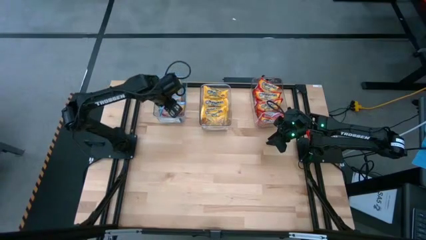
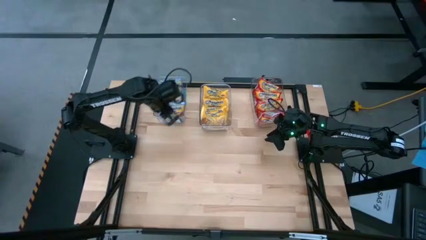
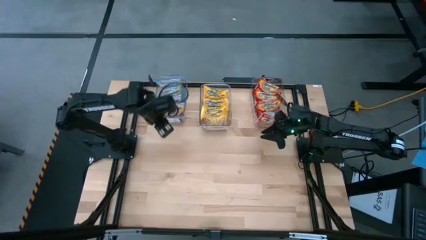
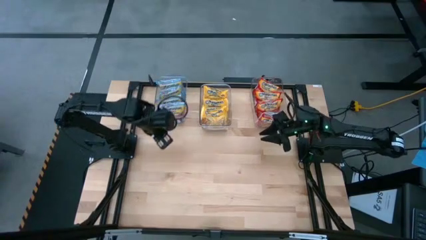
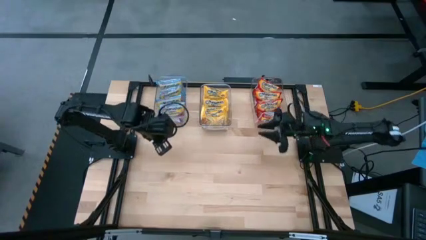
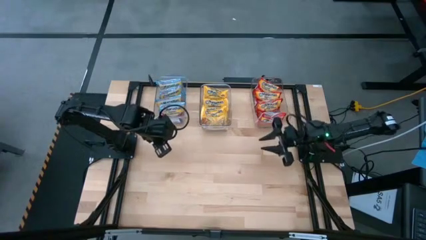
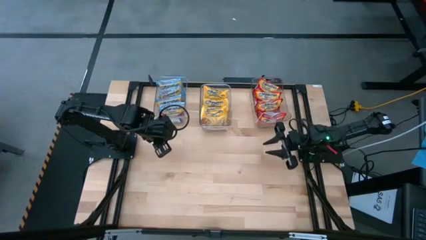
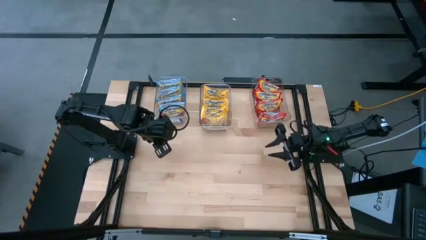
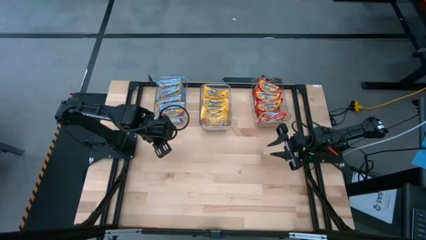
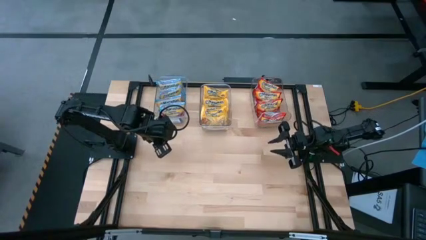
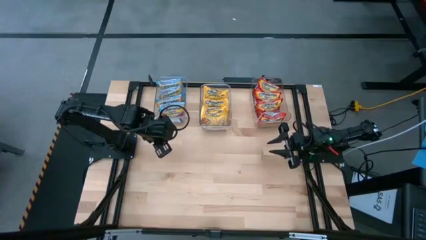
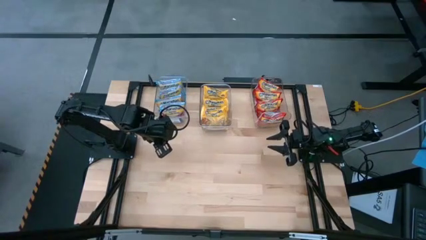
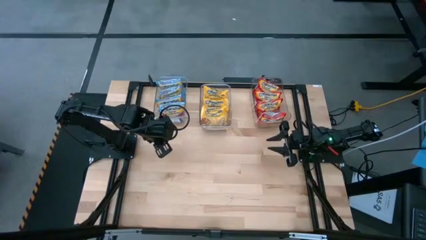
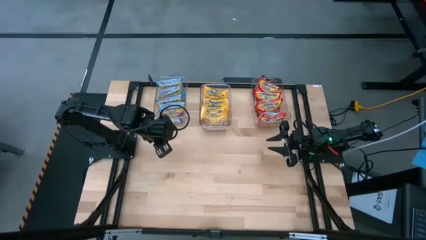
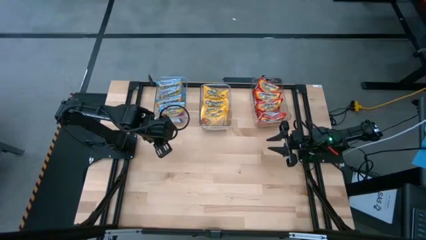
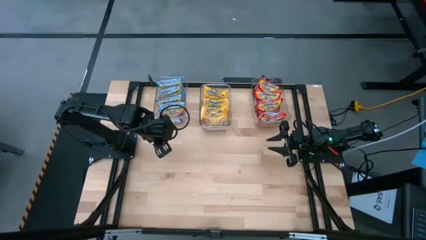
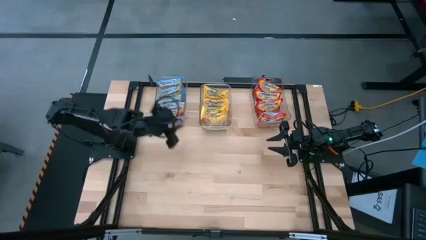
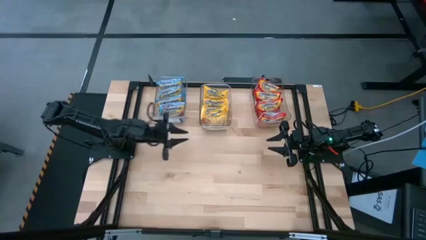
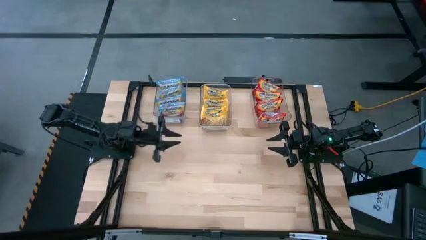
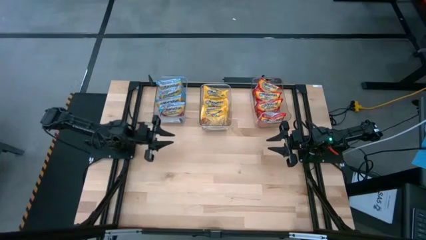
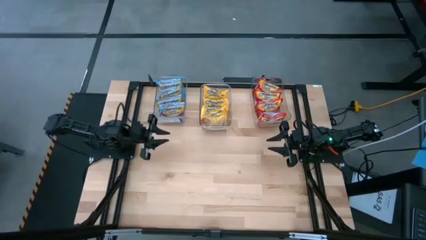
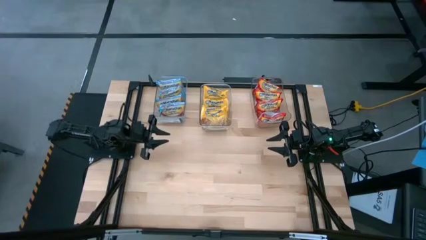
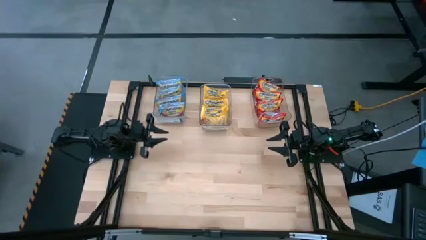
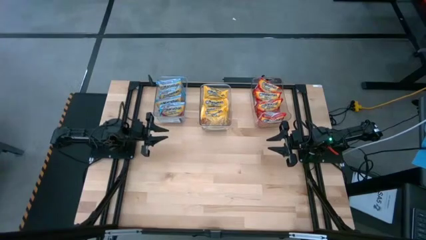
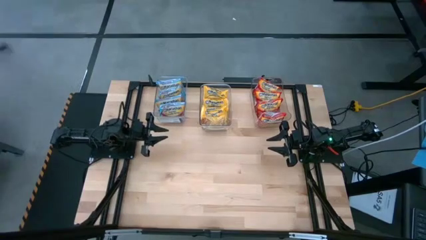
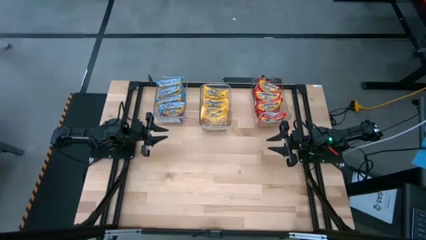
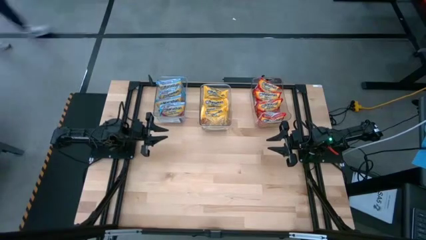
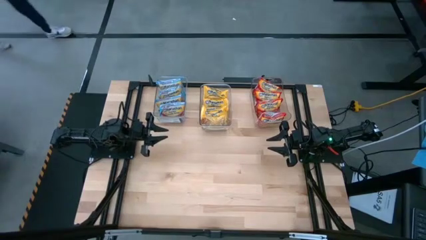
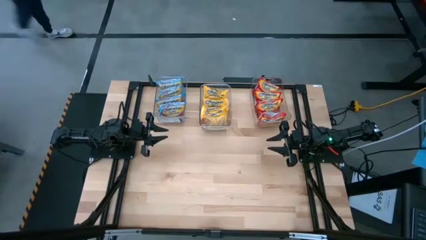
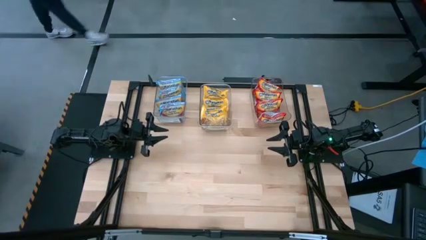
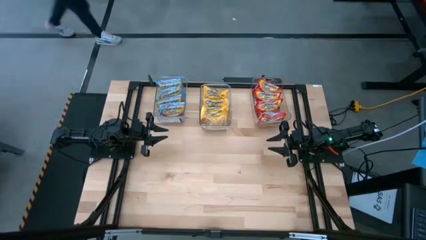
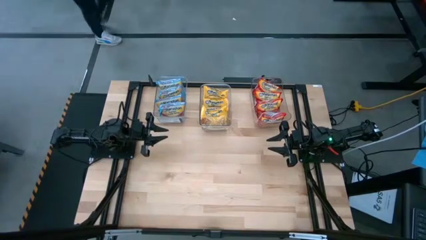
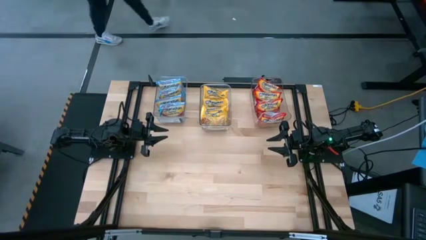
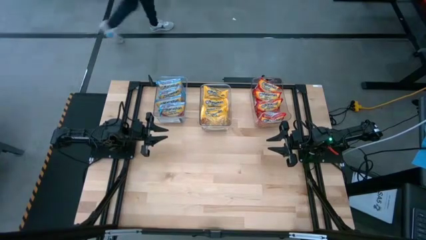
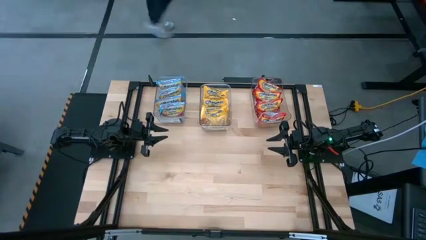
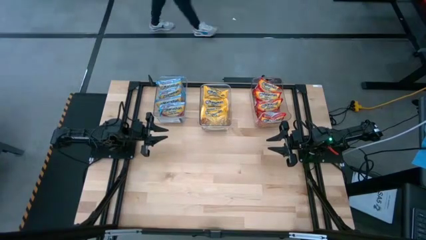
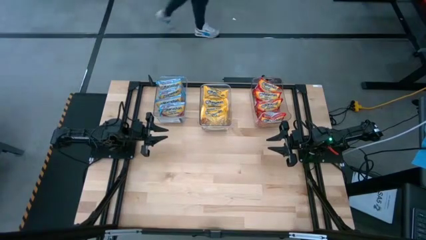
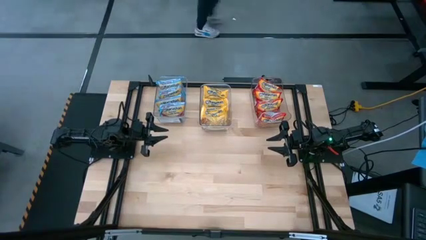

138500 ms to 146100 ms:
Task: Sort Maruchan noodles
Return to Home Position

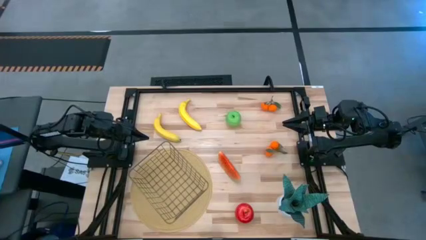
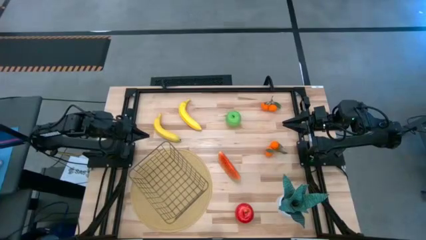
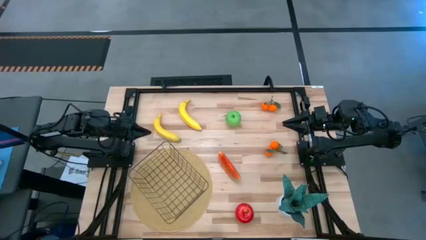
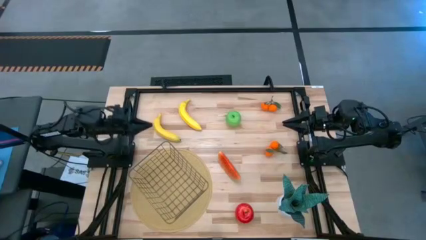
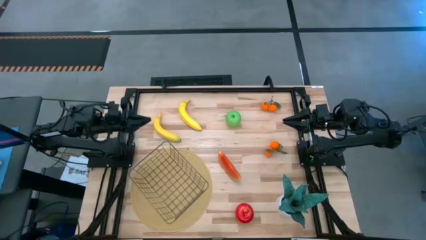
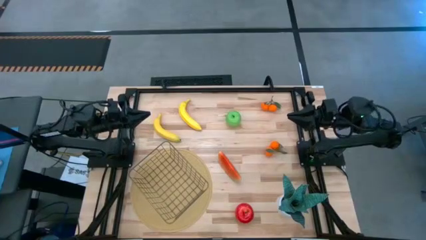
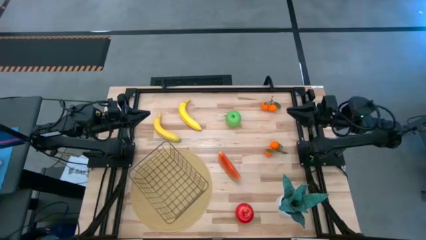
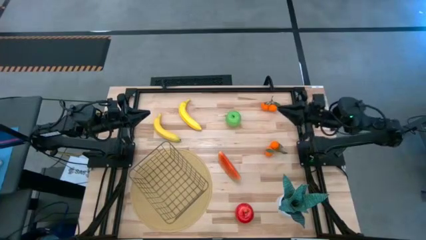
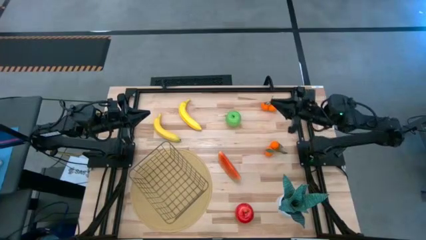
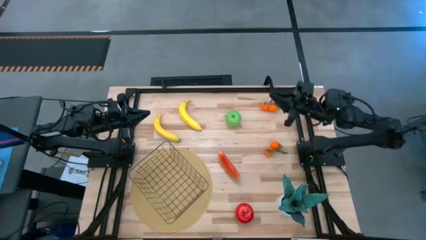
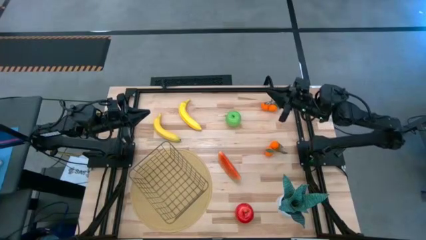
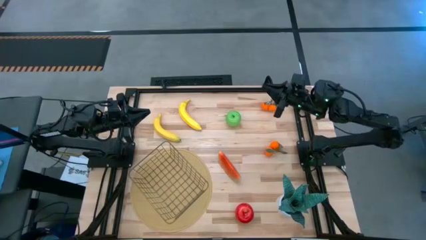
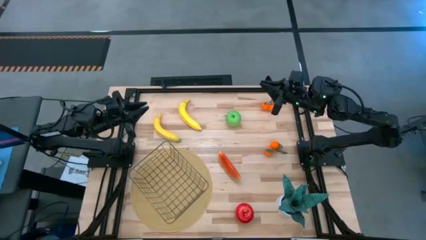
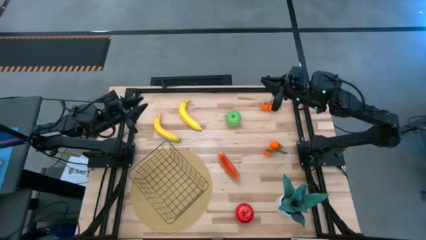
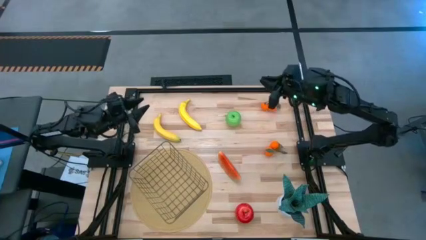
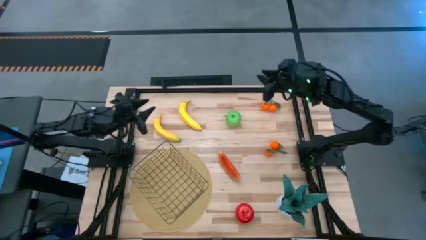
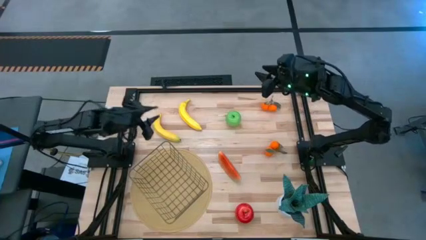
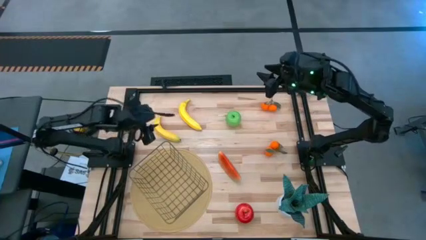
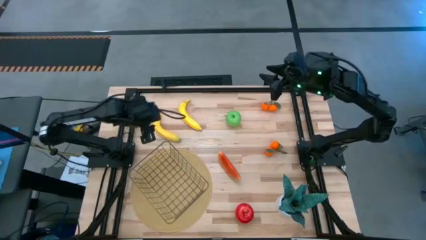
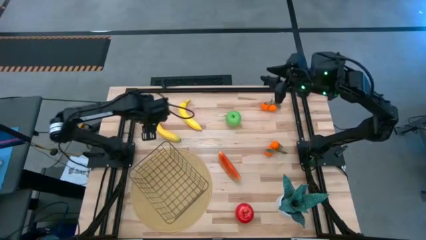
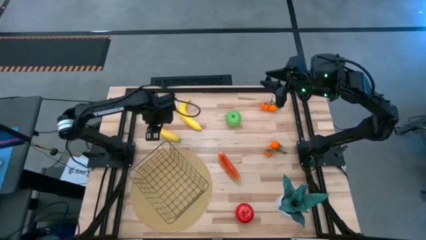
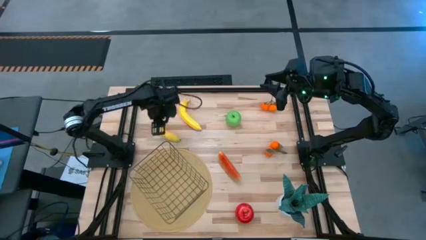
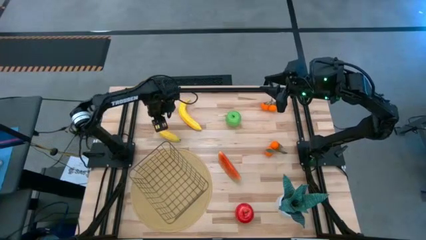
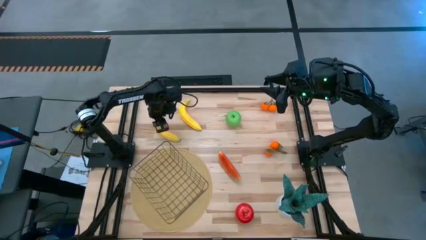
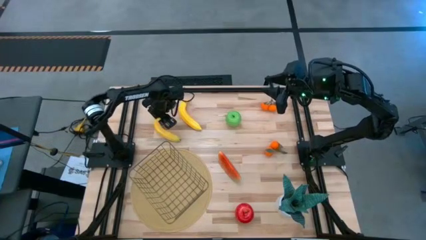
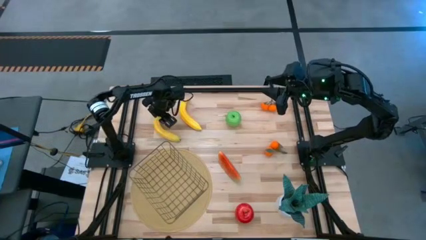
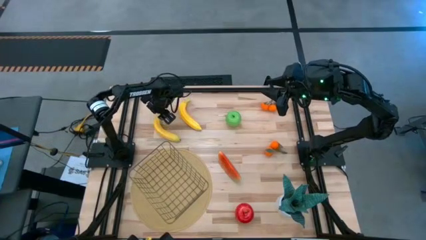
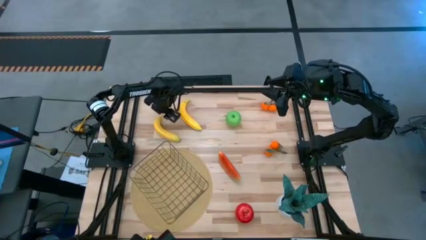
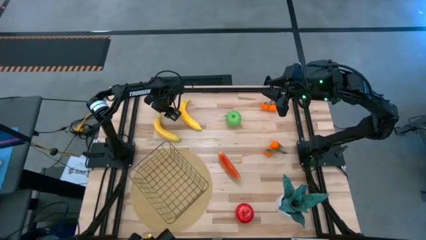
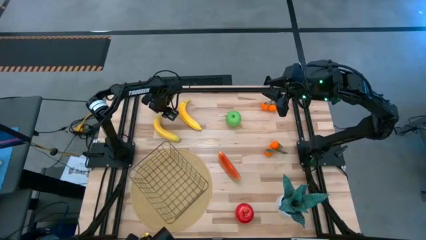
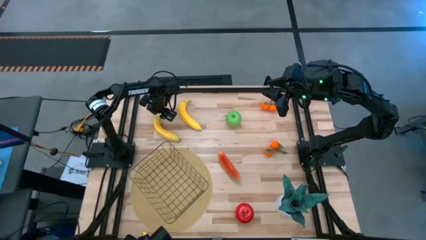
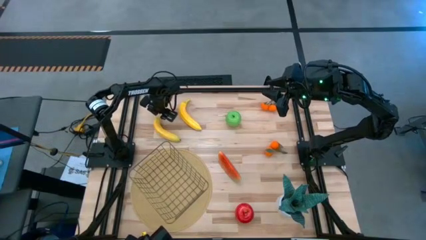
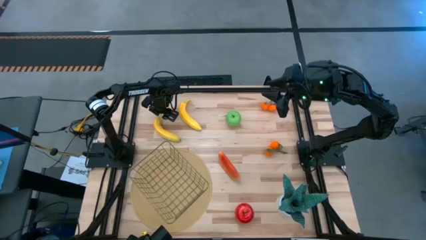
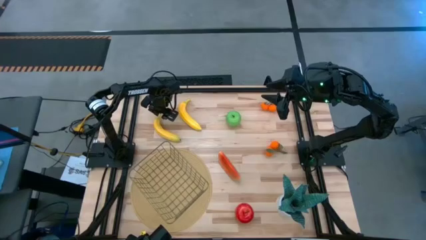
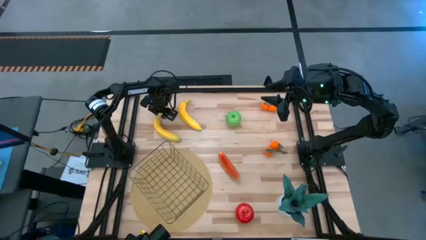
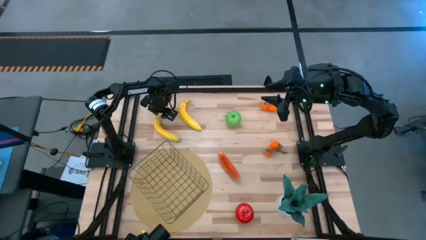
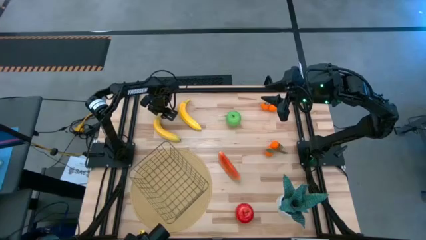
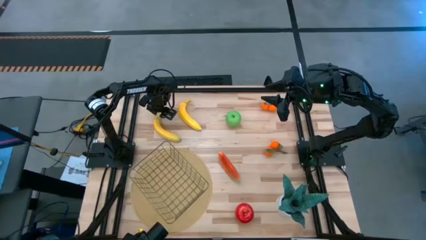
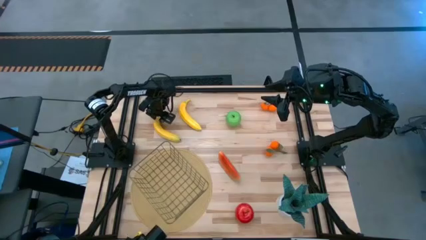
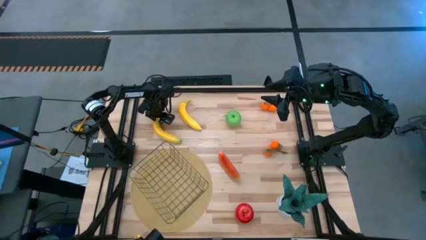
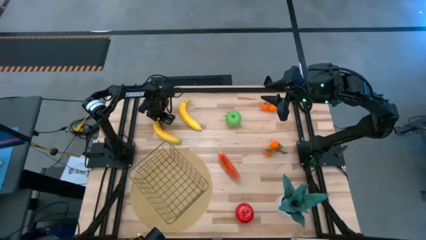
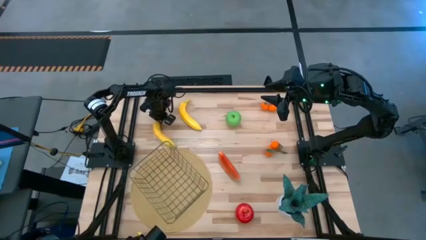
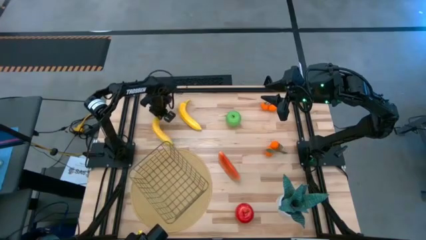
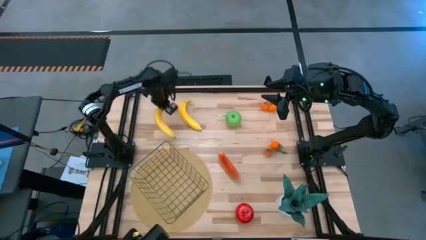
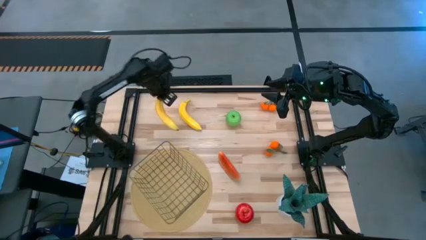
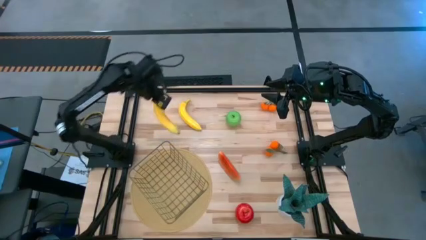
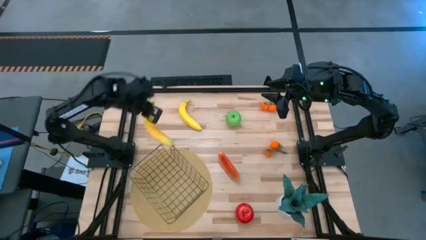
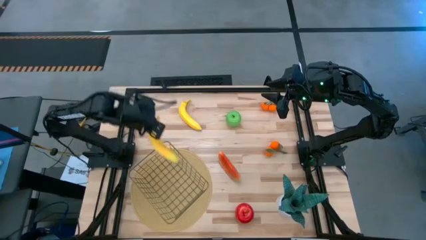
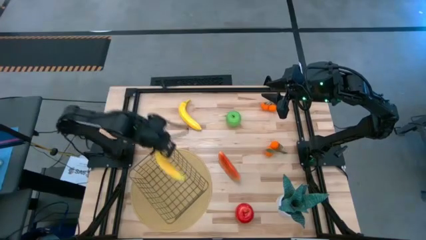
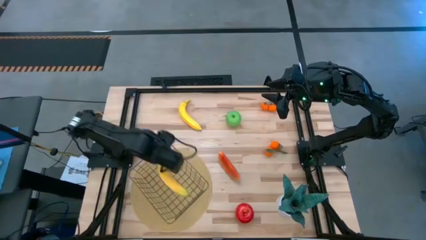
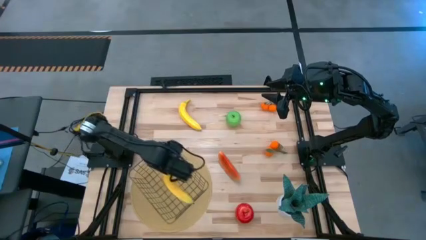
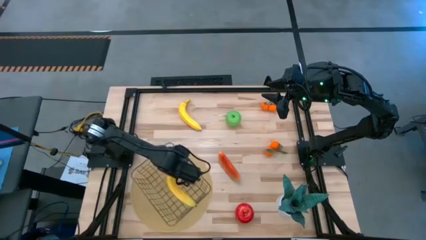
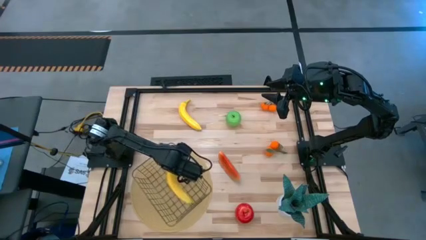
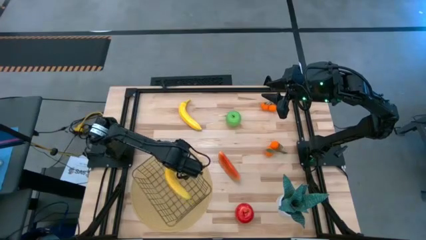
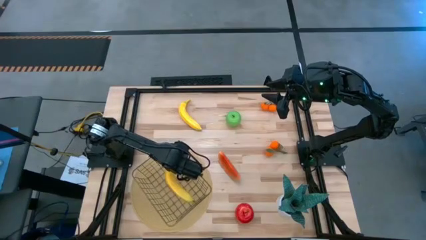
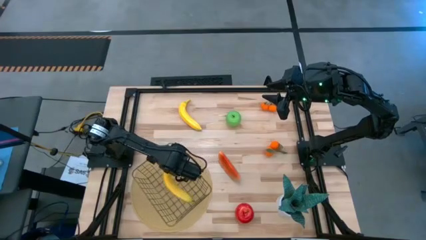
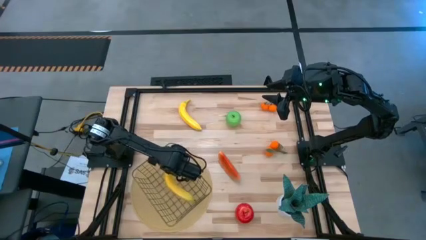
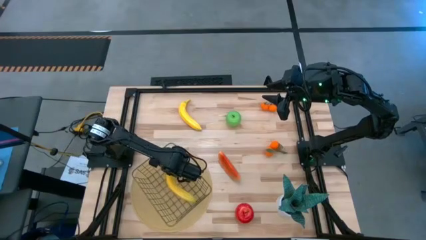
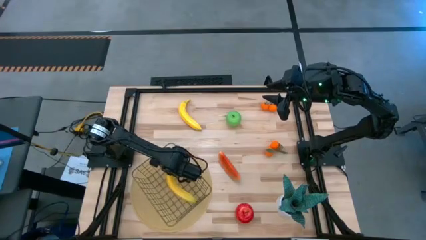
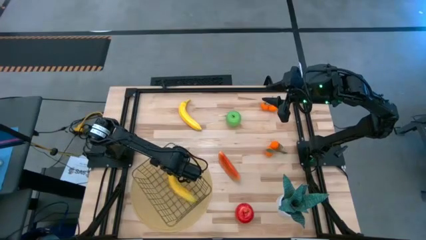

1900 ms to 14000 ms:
Task: Build produce basket
Put the left yellow banana into the gold wire basket
